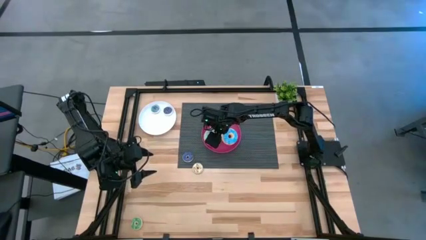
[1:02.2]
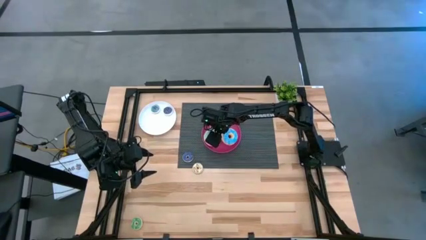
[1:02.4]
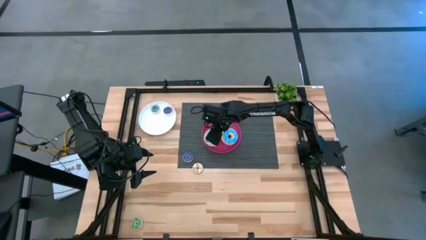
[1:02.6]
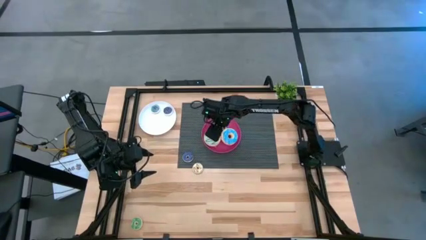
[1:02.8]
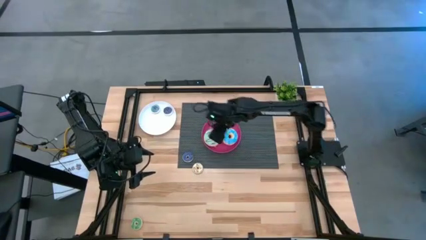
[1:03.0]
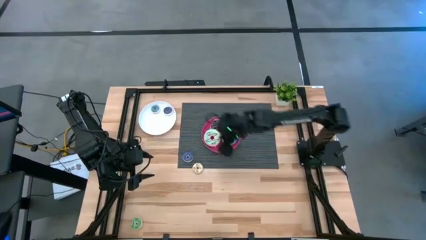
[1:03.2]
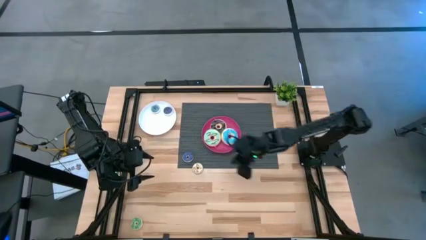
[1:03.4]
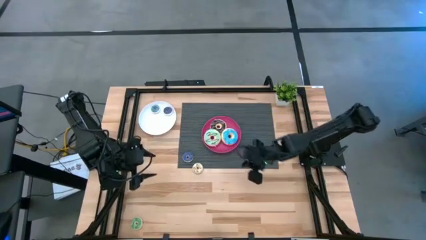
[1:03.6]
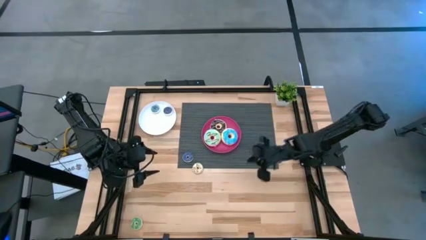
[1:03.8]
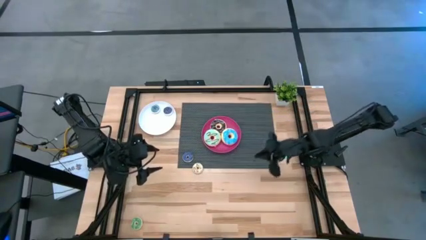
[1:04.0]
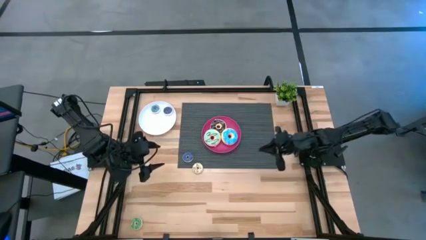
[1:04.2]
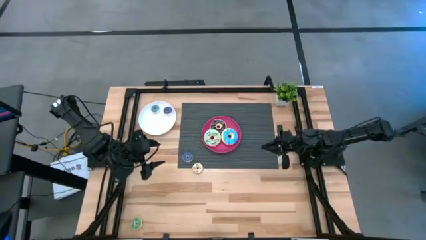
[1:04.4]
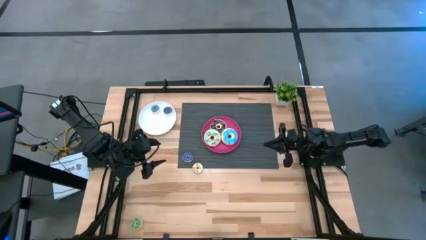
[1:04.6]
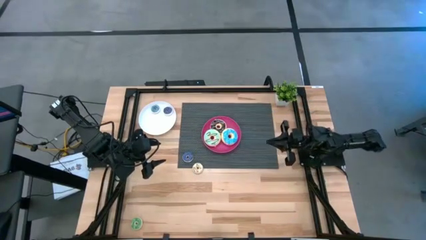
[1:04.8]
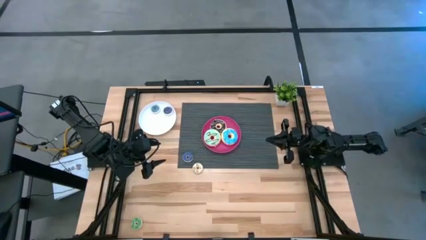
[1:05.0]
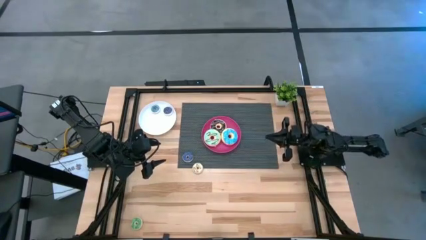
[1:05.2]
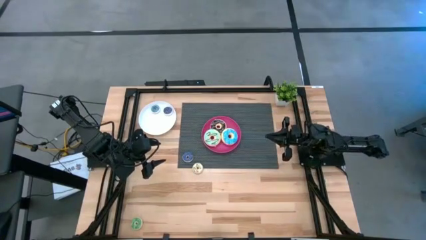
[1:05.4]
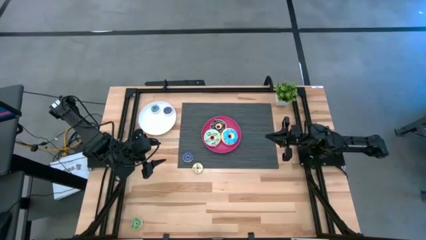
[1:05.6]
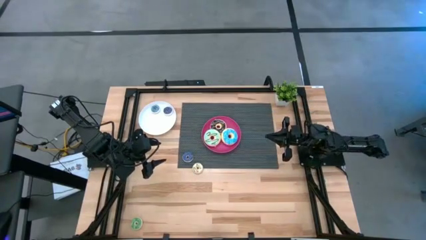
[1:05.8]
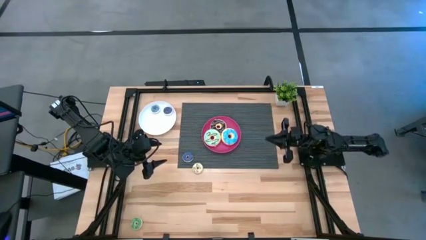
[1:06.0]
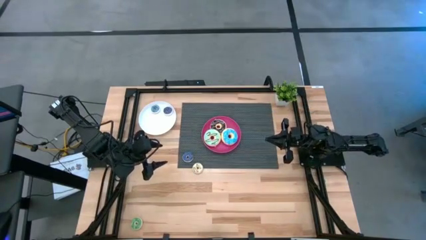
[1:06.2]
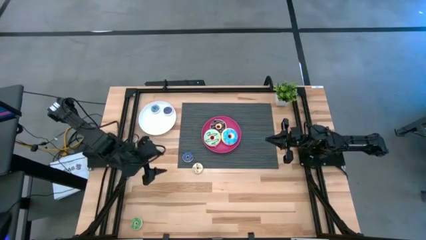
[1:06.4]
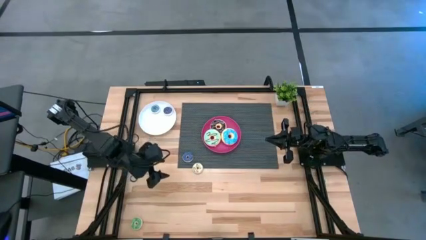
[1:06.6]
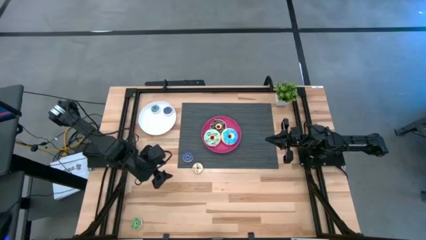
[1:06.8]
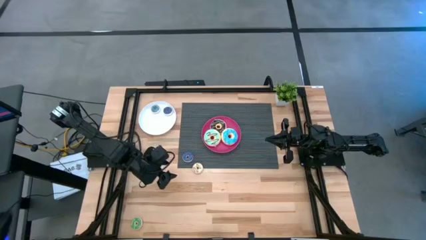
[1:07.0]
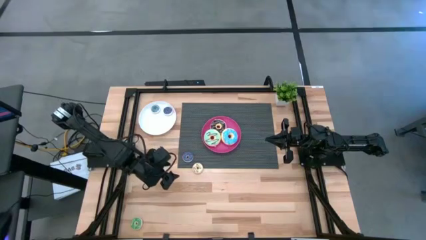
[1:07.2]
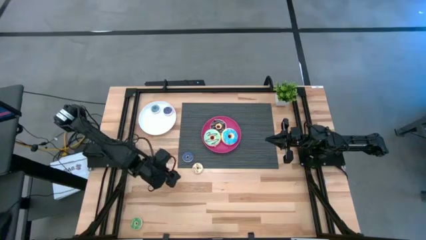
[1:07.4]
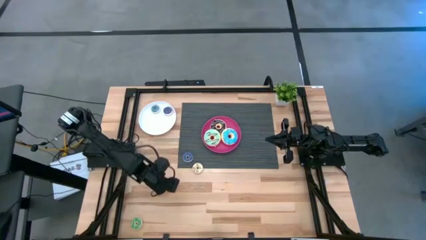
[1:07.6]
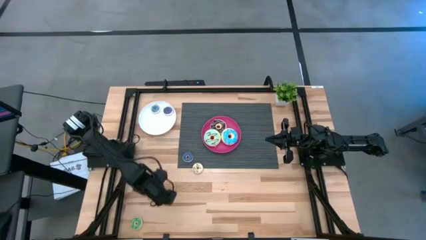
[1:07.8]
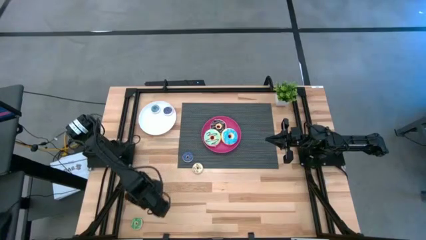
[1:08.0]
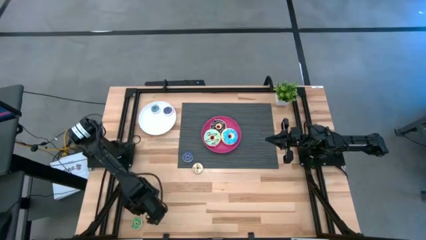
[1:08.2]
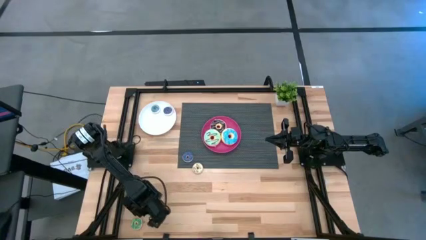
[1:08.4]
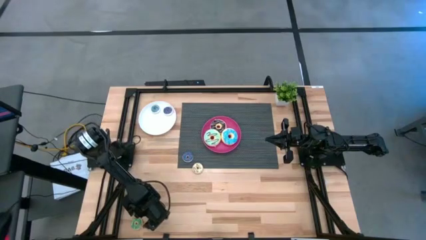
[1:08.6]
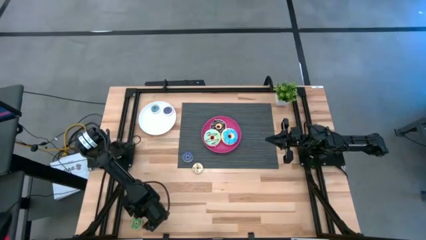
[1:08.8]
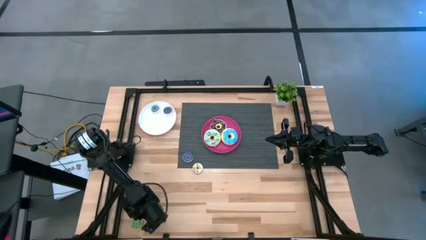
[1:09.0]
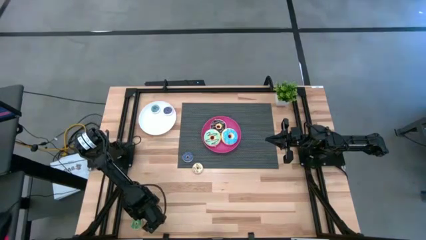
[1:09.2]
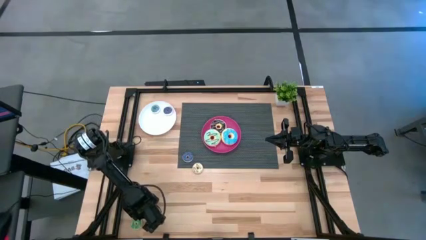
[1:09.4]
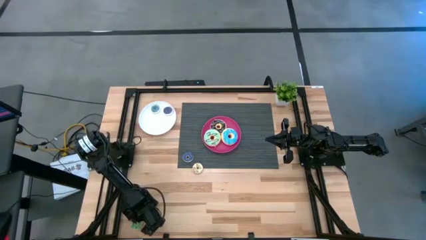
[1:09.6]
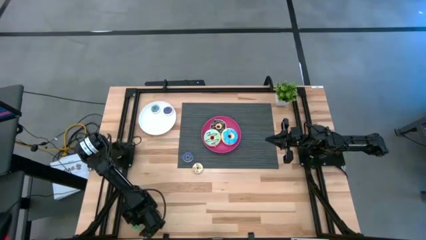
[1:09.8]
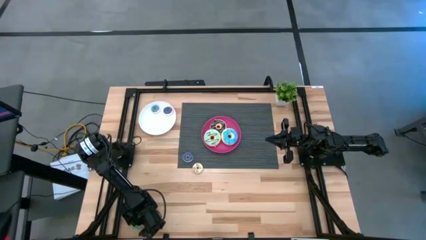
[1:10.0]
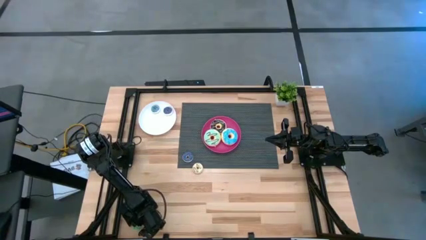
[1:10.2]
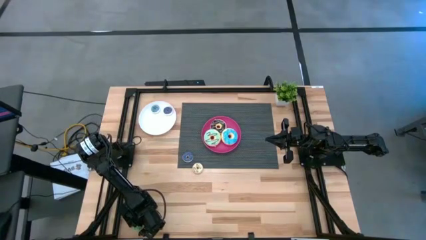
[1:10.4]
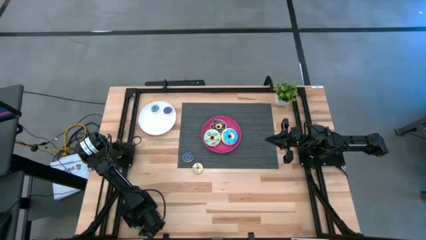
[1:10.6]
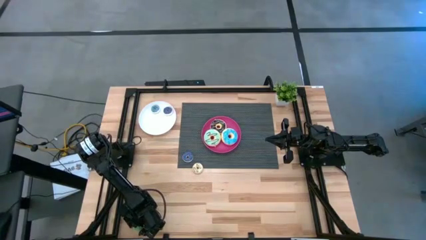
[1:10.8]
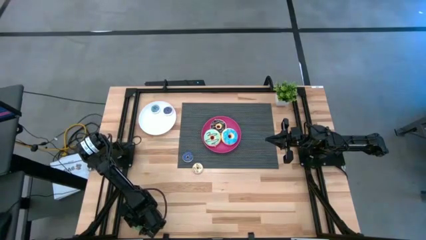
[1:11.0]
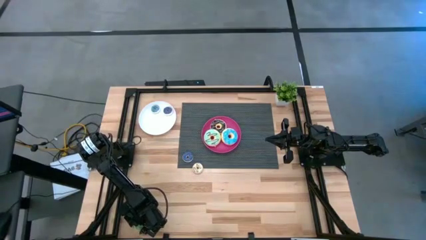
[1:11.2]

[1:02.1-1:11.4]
Task: Pick & Place donuts
Put the small green donut on the white plate

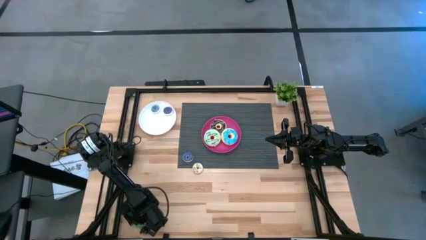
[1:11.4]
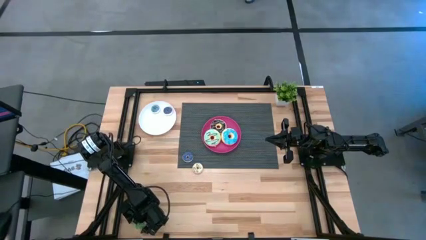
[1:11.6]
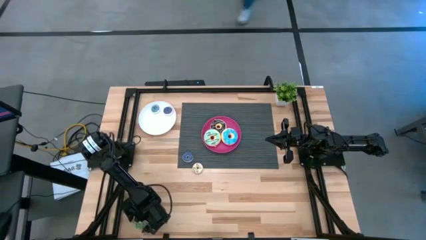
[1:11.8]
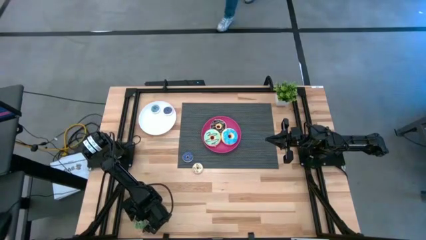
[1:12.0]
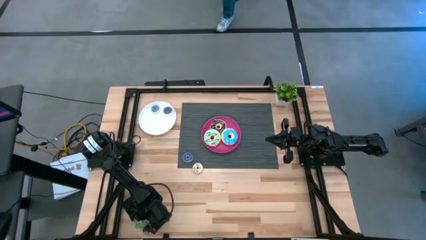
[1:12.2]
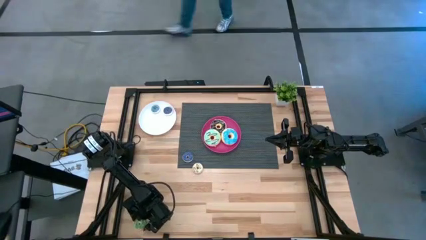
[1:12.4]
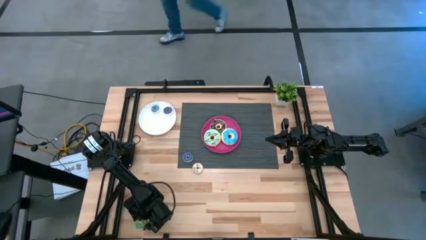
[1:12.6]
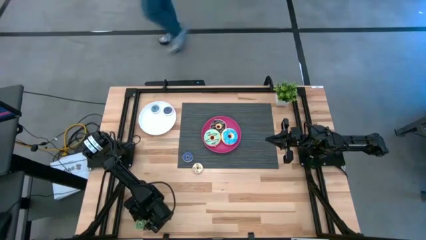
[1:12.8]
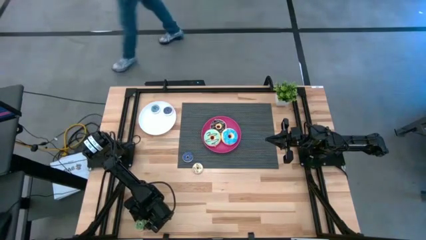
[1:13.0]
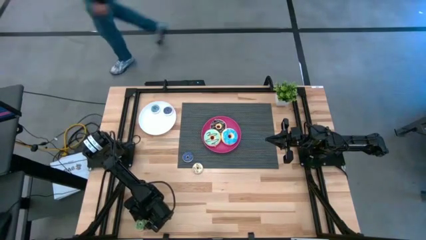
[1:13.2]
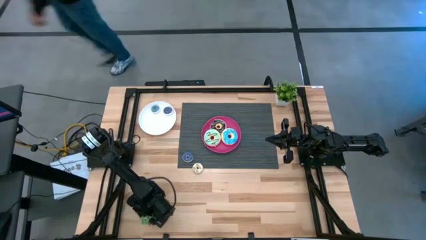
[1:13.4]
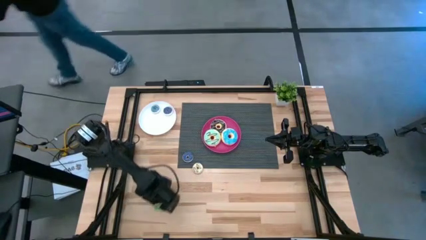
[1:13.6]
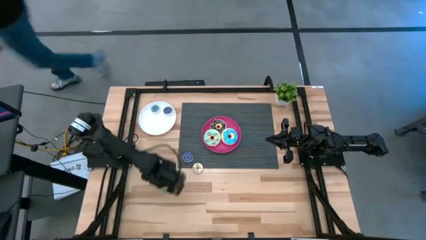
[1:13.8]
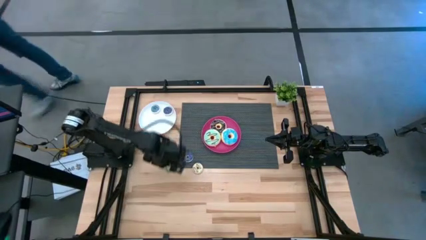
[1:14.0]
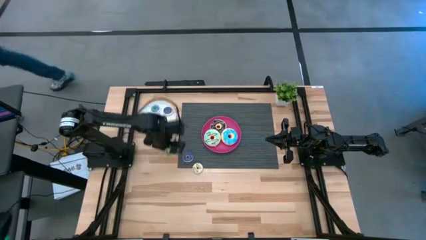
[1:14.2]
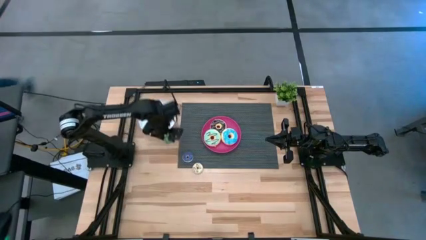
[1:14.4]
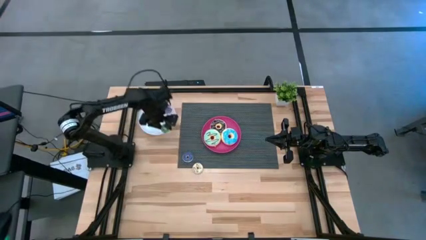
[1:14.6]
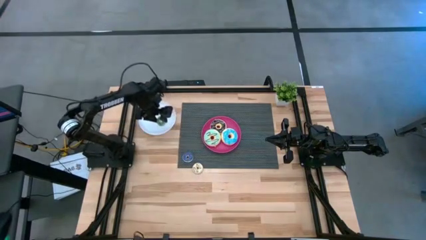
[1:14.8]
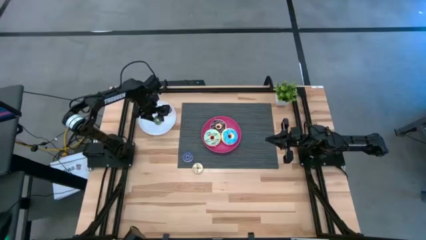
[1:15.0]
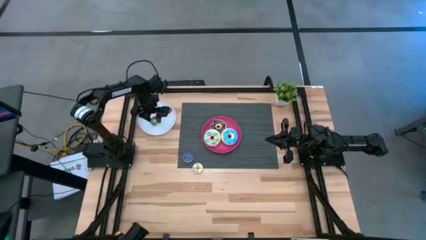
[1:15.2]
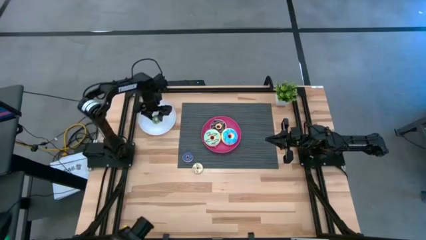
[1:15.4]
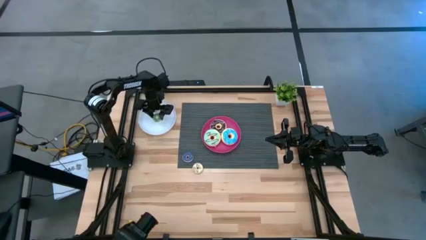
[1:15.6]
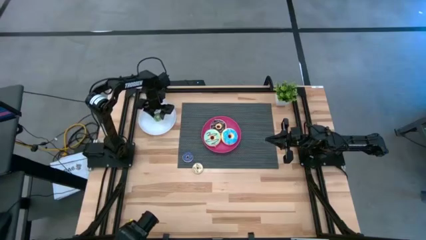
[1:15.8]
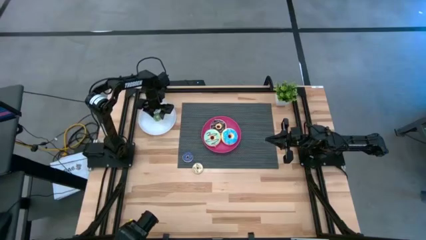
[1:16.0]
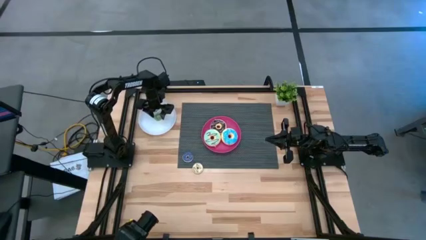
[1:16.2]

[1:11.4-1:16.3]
Put the small green donut on the white plate

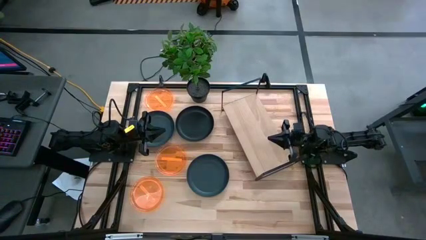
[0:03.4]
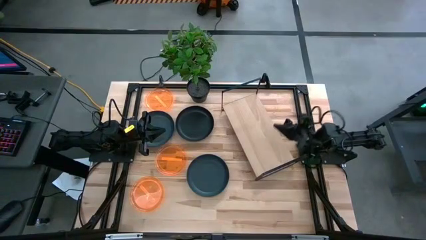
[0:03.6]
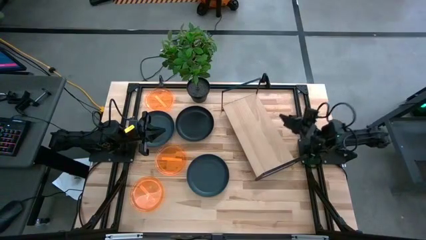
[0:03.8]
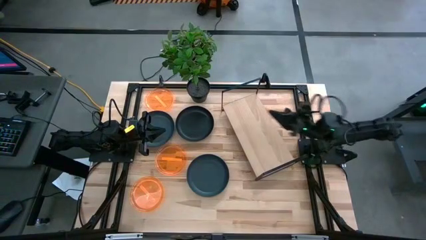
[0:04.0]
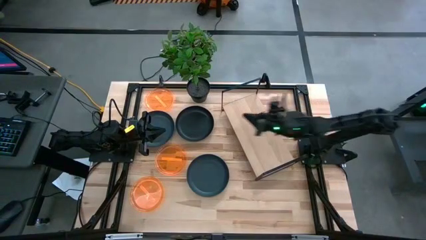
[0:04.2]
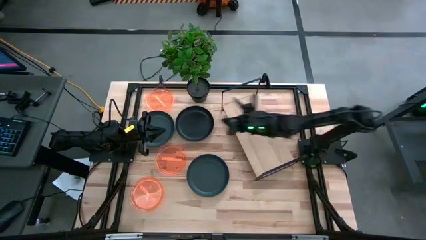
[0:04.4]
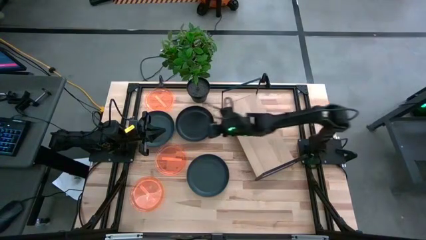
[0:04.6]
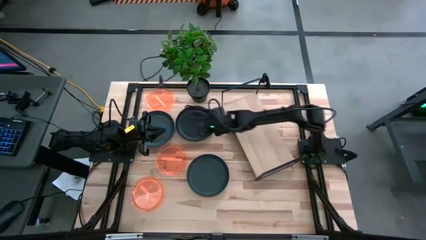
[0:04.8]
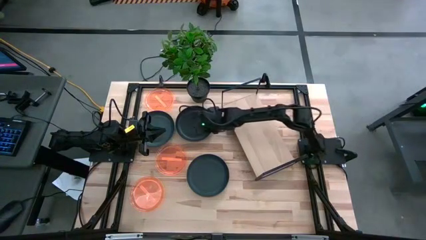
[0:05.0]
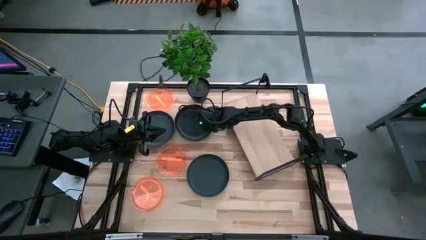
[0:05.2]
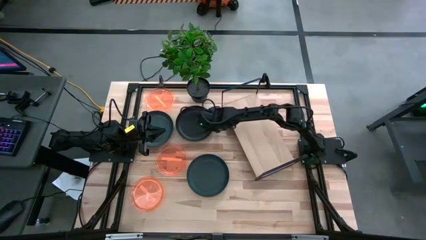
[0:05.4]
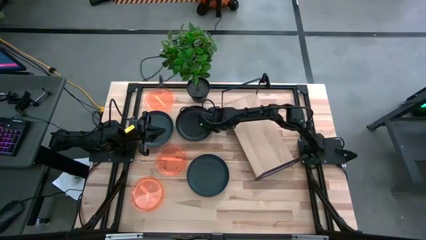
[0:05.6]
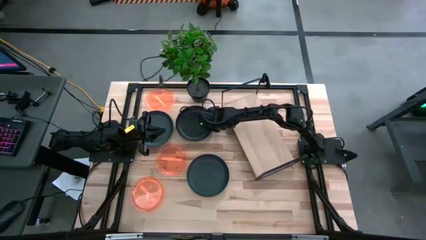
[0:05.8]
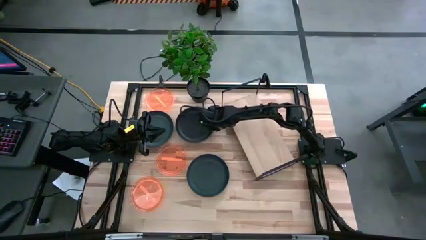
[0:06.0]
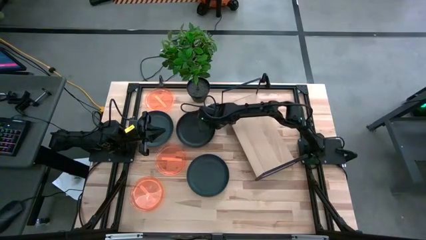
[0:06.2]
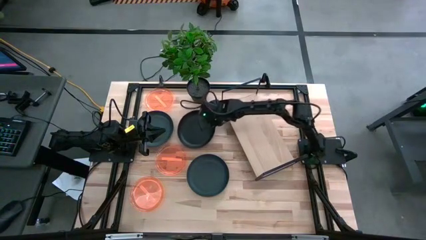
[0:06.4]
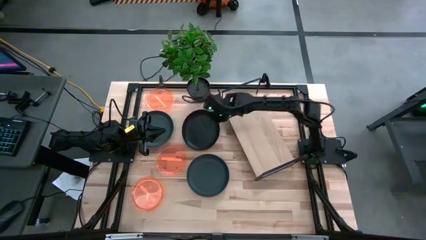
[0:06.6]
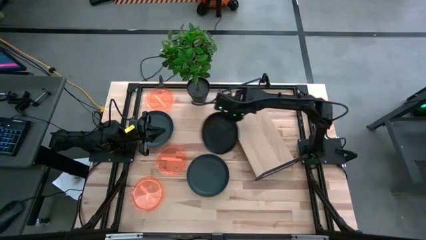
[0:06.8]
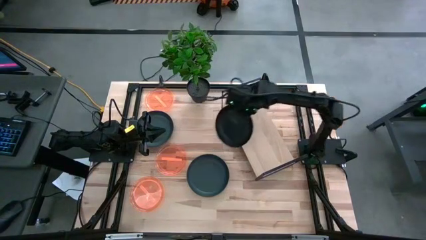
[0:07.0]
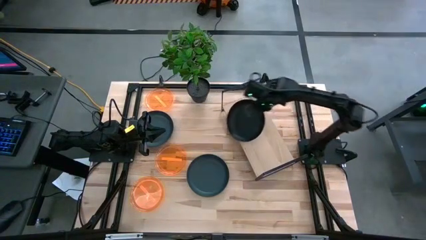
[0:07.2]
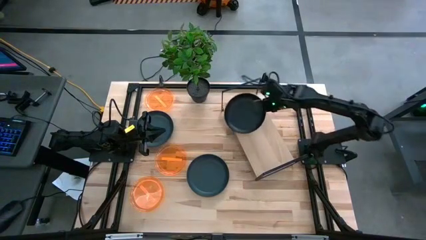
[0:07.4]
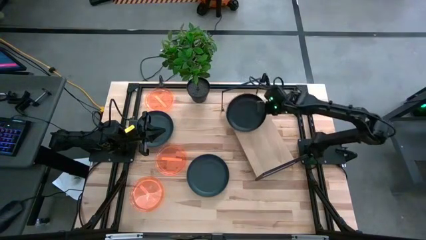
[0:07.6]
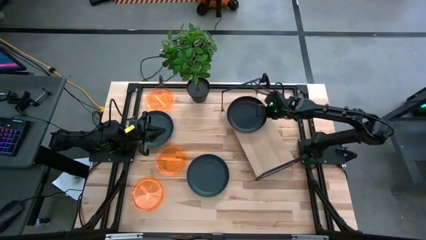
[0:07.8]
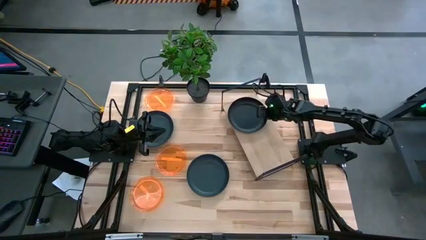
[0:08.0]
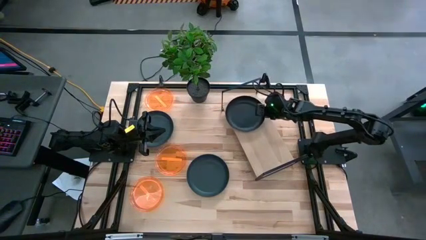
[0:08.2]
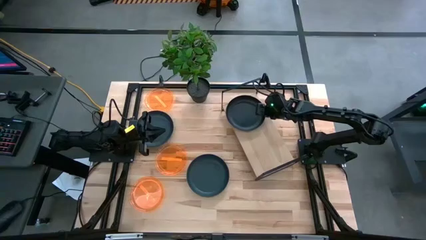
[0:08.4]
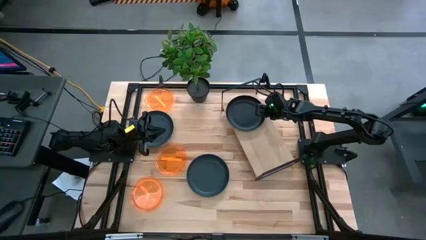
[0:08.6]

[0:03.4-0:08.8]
Task: Place and stack plates onto a shelf
Put the top right black plate on the shelf
